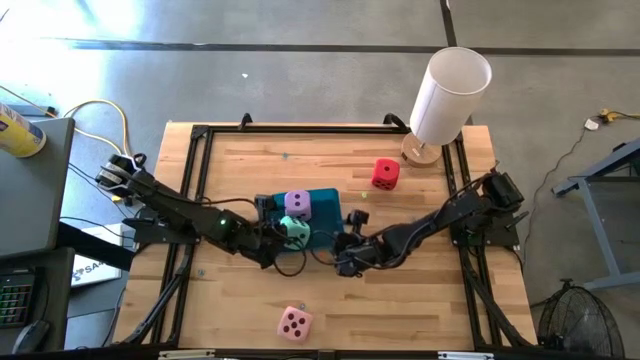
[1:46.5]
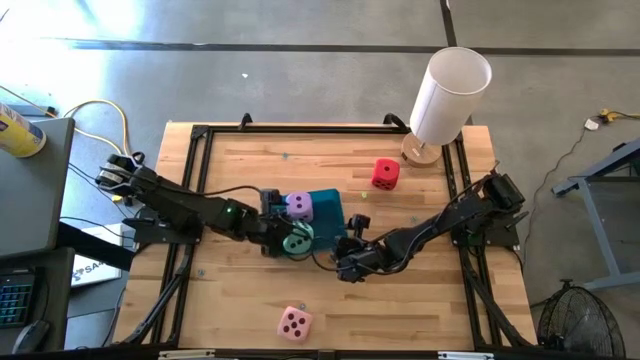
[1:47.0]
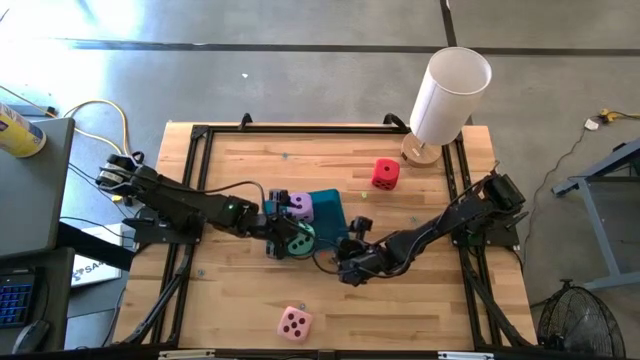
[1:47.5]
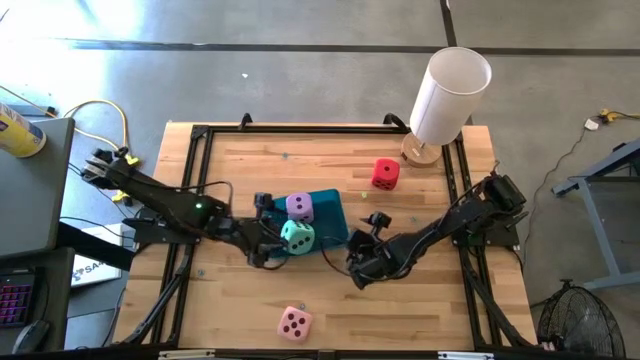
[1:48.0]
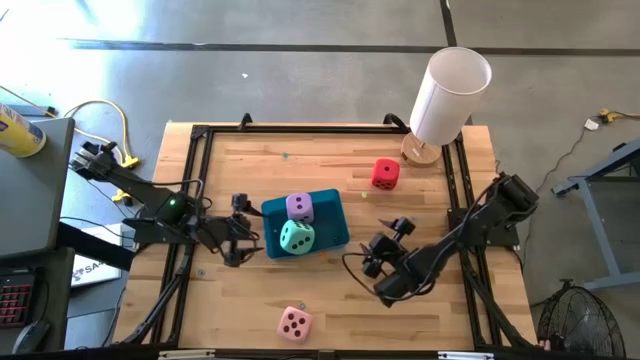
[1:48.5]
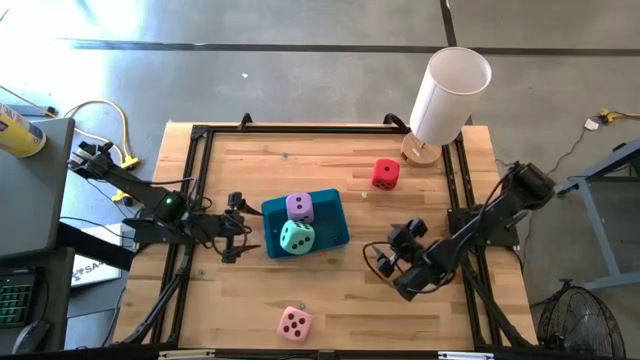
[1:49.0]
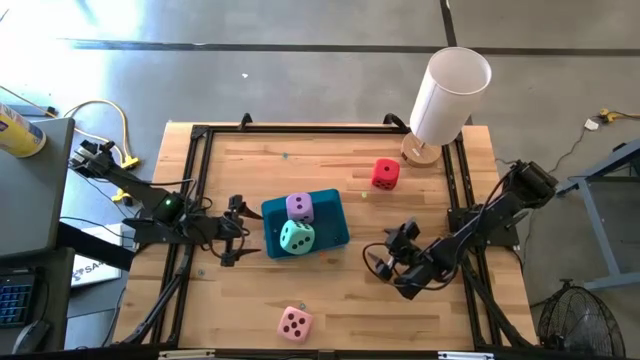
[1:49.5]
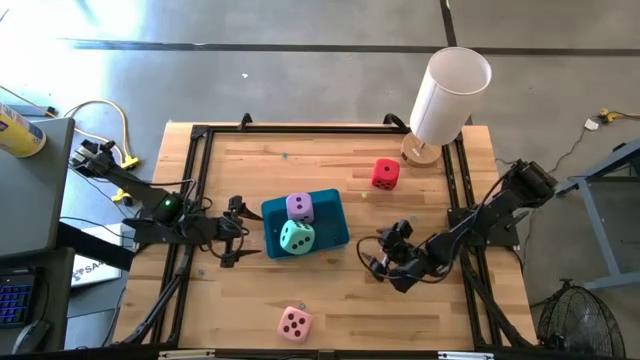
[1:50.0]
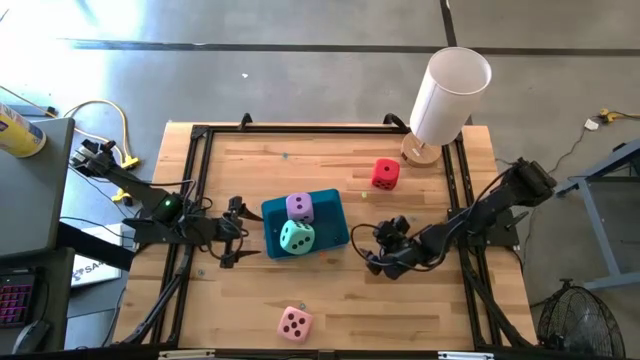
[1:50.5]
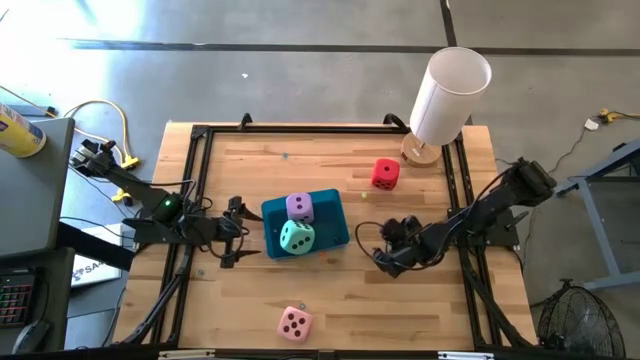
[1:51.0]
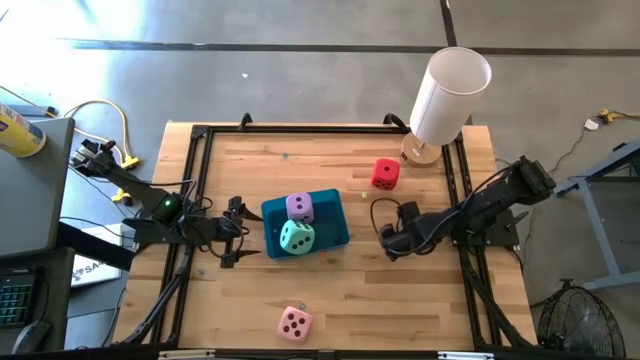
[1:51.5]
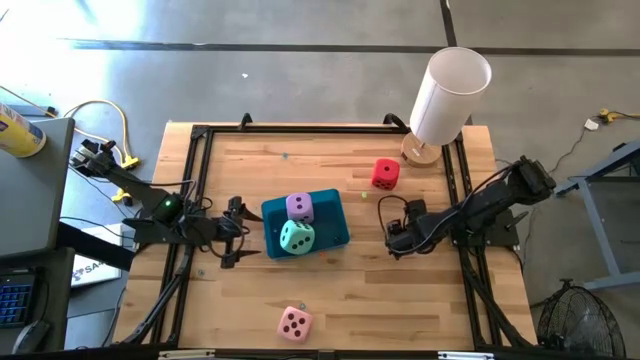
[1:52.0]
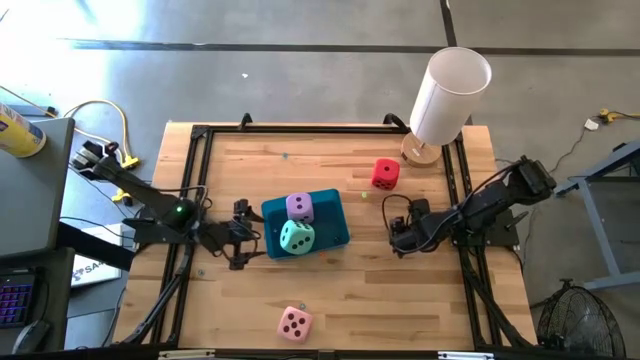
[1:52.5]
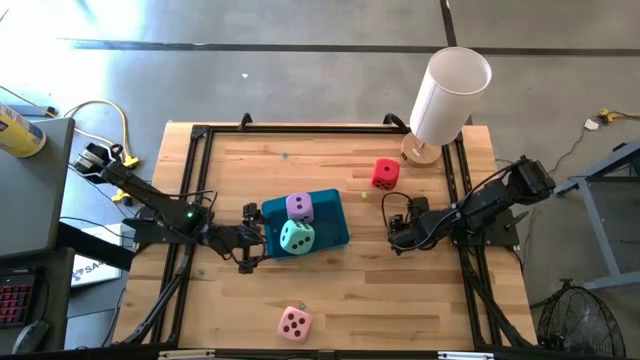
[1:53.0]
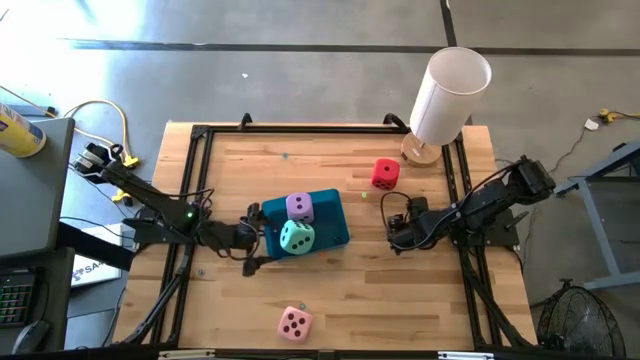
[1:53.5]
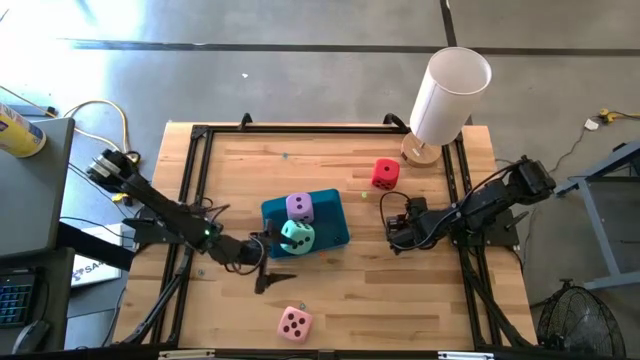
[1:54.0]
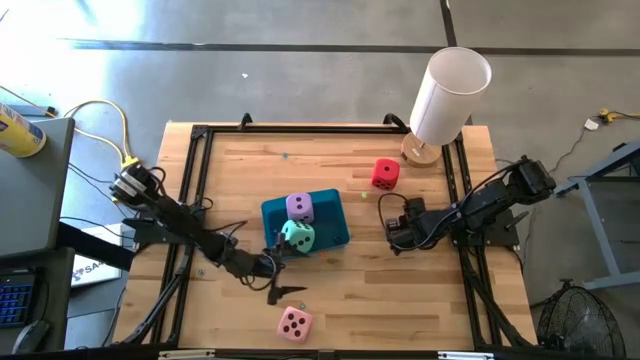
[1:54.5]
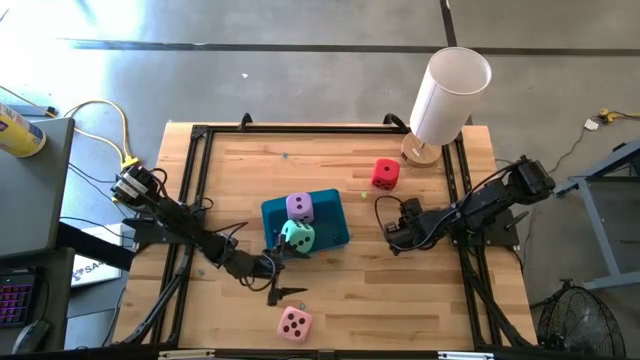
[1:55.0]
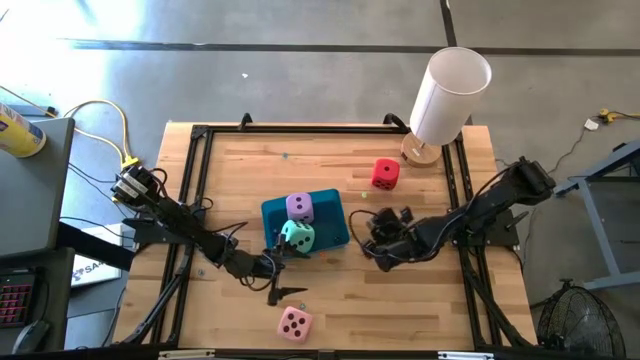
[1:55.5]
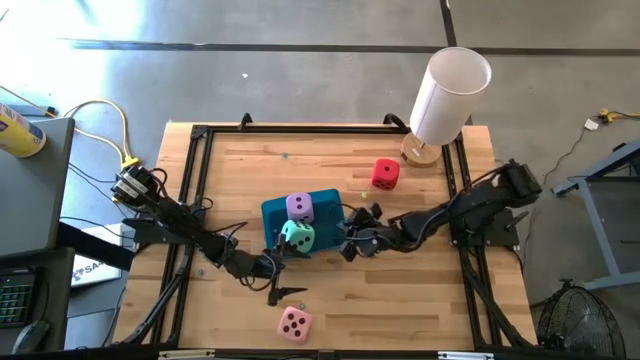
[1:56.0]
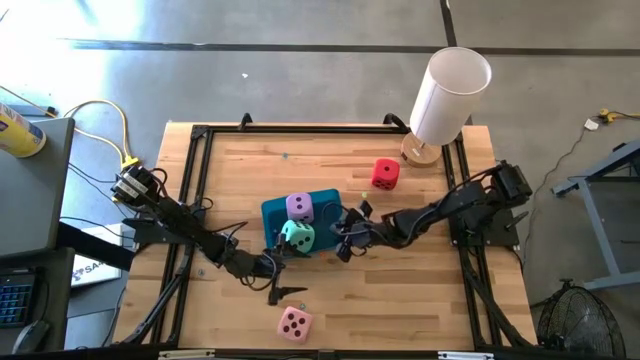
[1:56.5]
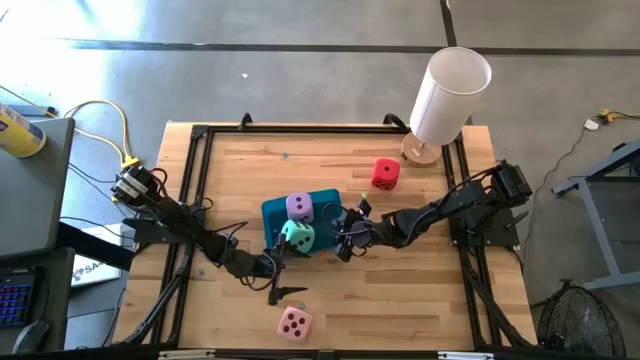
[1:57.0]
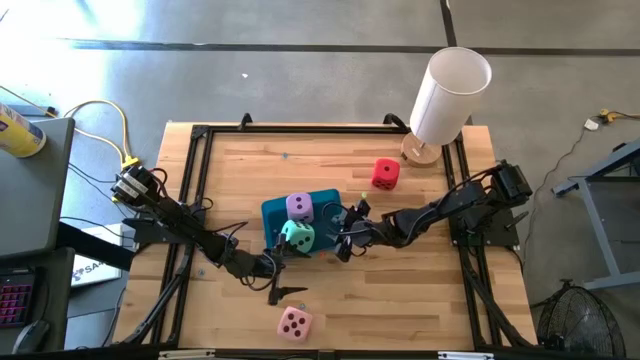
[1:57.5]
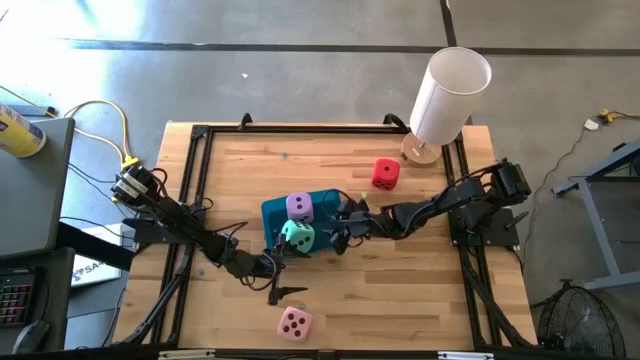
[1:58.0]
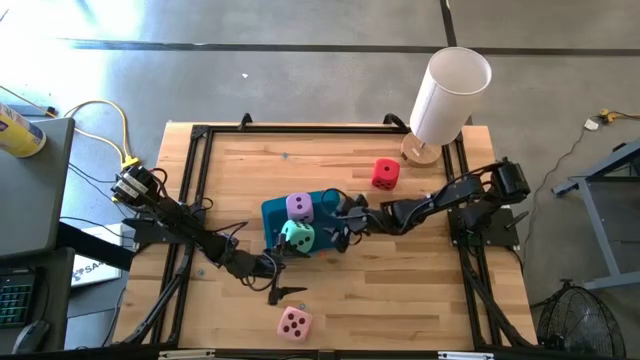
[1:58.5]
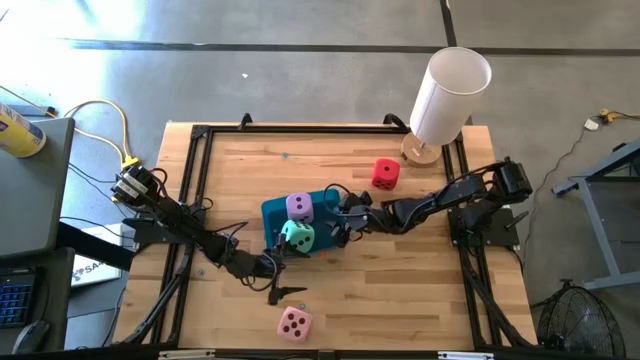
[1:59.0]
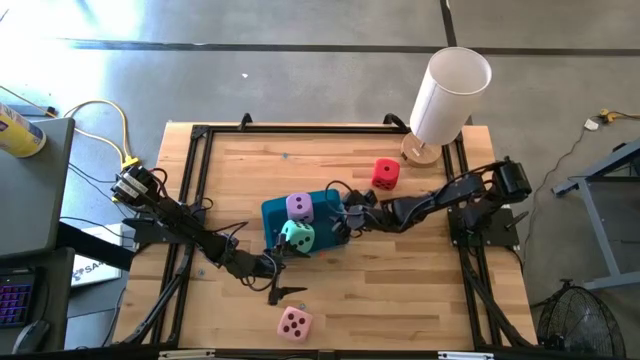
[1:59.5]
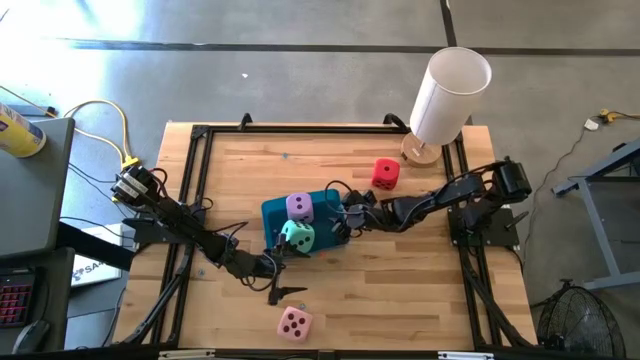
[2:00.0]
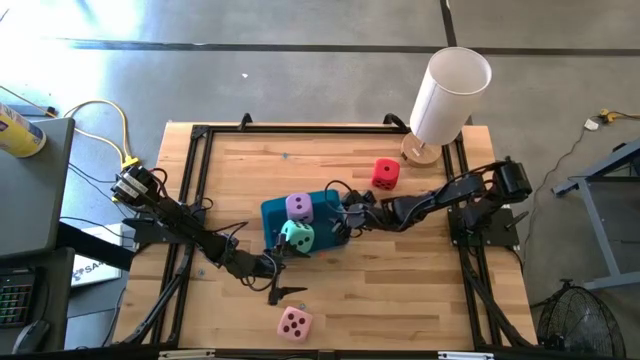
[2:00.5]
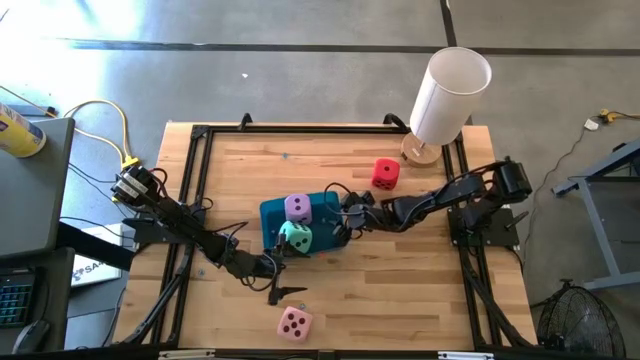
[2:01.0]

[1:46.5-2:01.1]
Task: Pick & Place Dice
Put the small blue dice into the blue bin

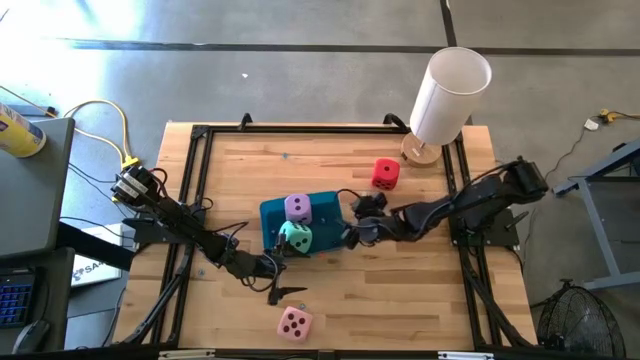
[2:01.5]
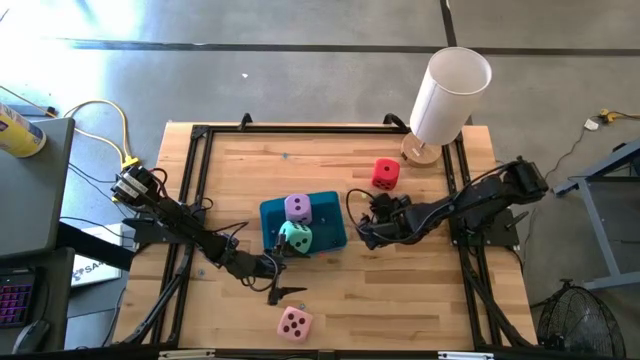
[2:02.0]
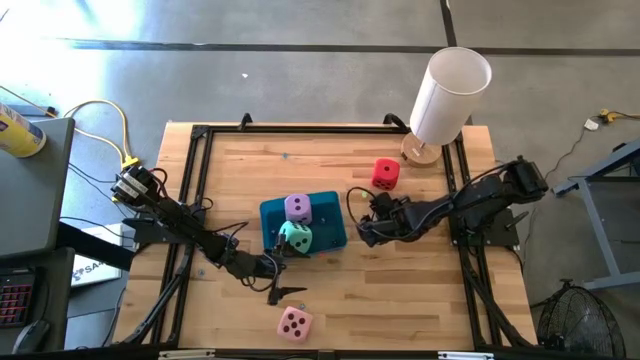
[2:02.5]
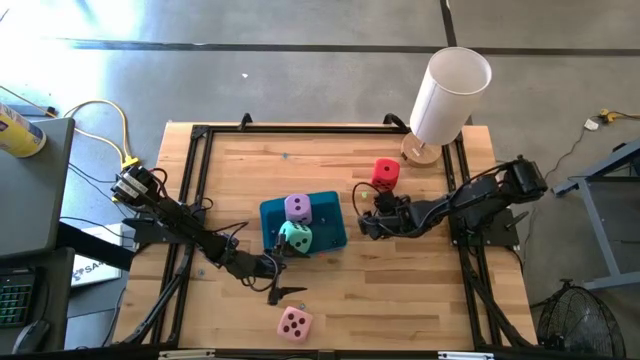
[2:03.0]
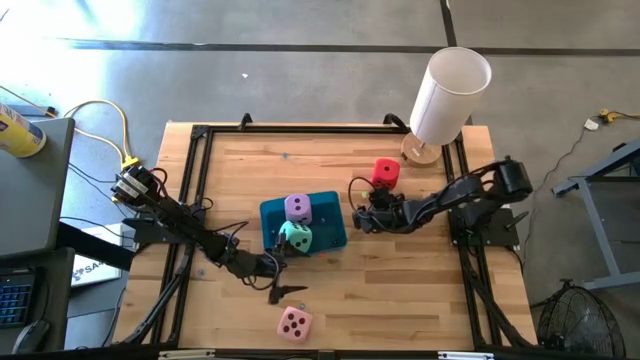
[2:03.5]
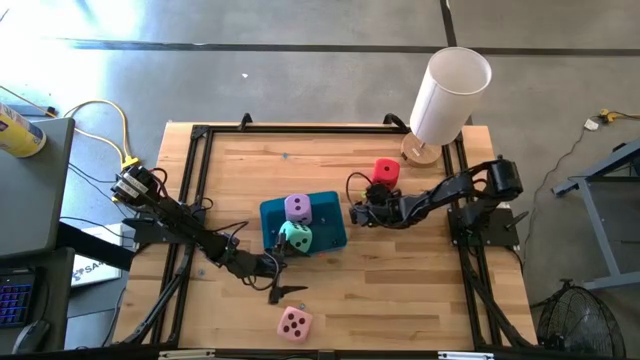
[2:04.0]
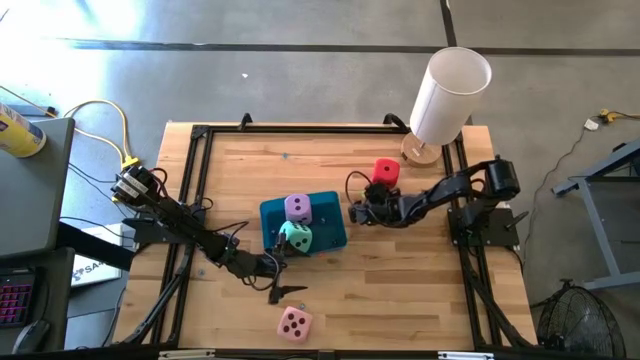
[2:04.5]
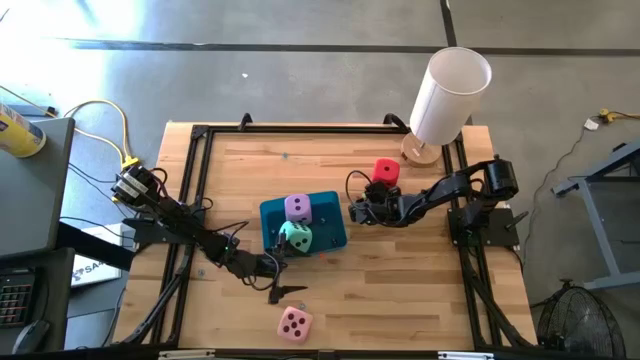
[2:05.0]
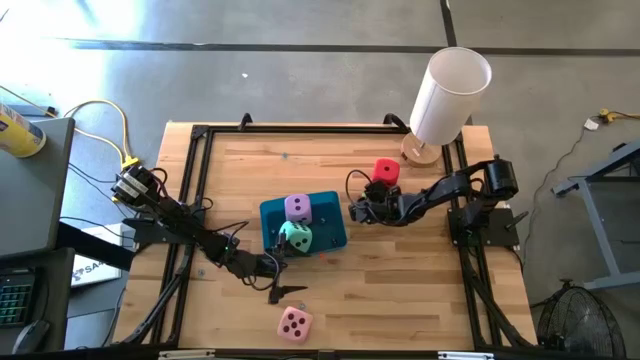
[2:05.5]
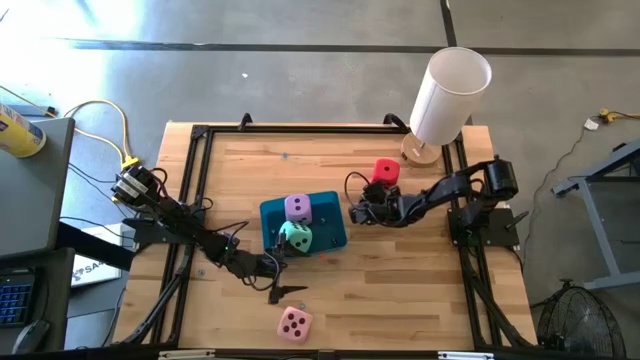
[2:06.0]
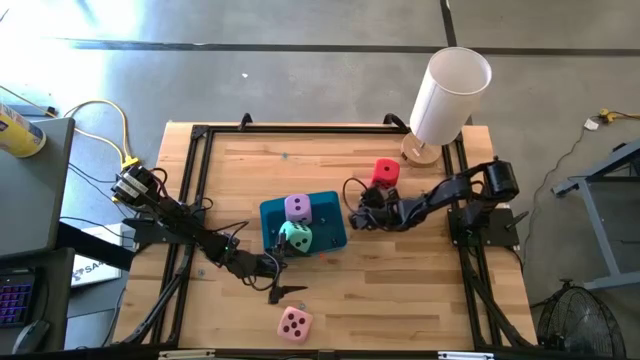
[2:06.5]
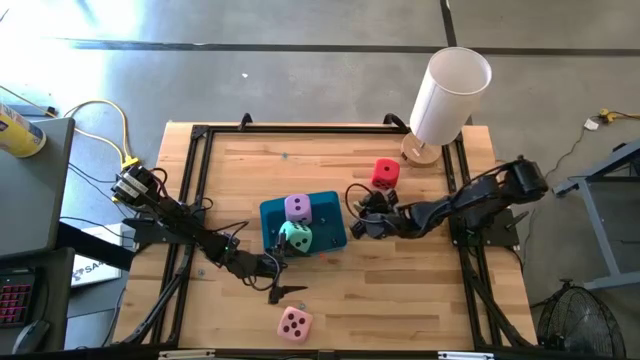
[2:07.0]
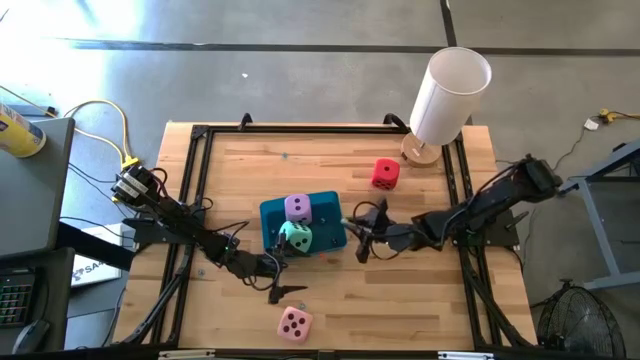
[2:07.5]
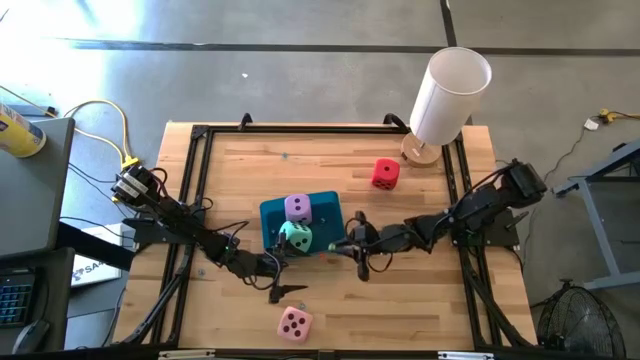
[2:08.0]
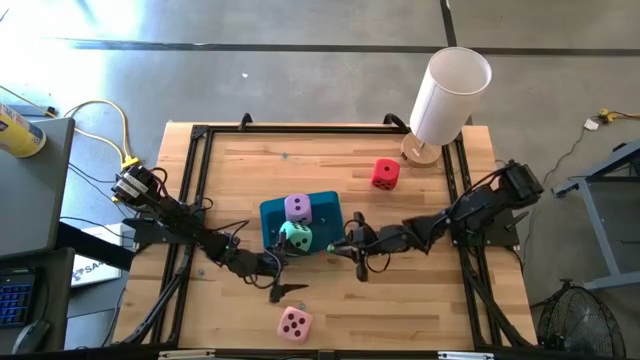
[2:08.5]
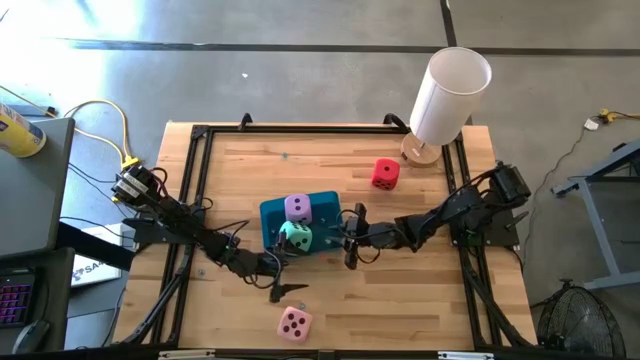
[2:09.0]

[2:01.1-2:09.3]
Put the small light green dice into the blue bin
